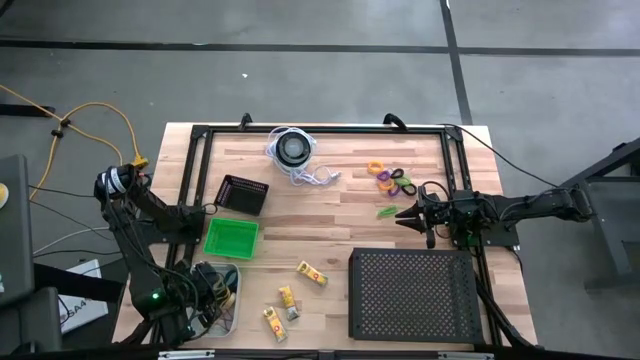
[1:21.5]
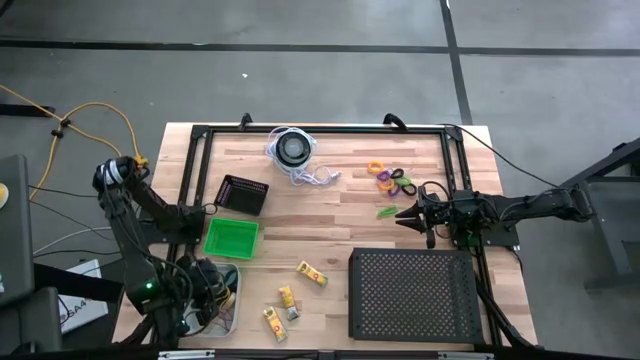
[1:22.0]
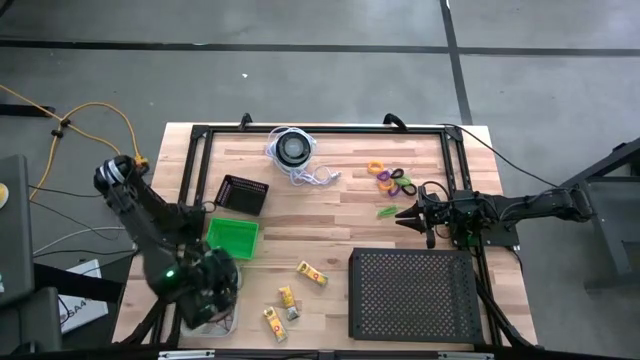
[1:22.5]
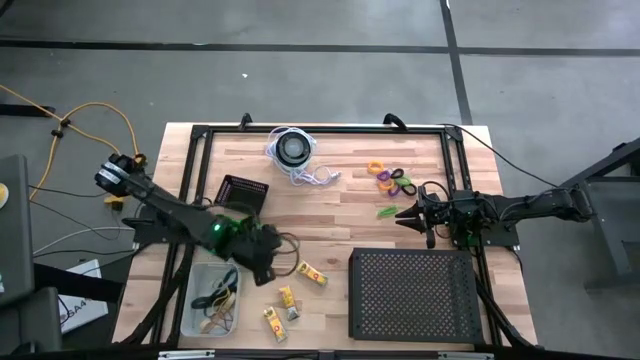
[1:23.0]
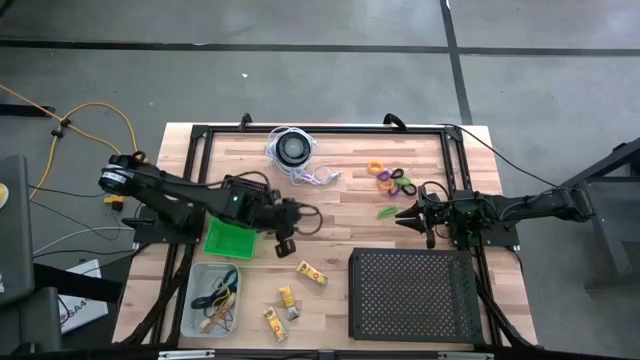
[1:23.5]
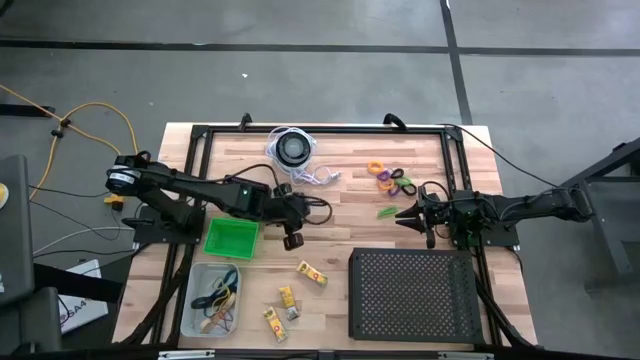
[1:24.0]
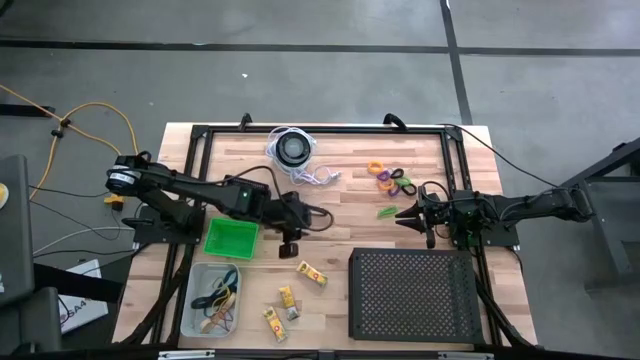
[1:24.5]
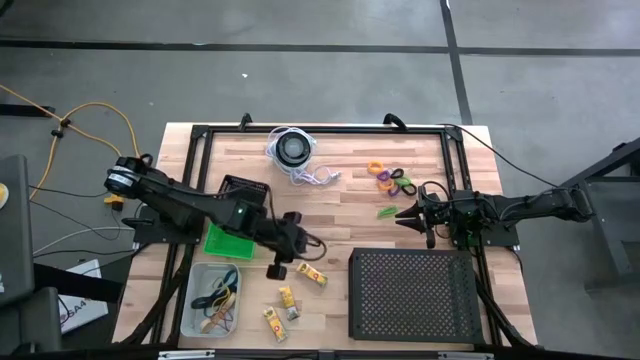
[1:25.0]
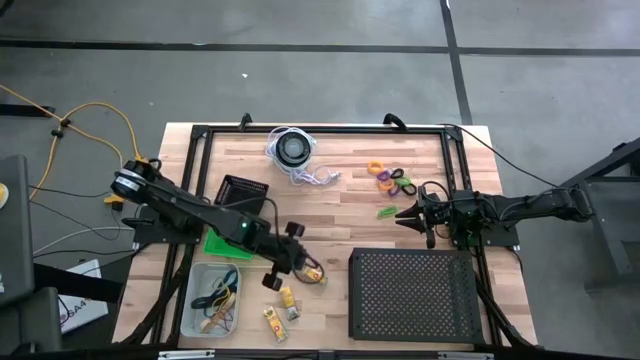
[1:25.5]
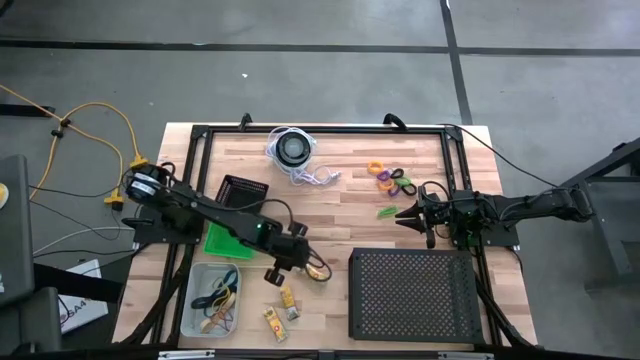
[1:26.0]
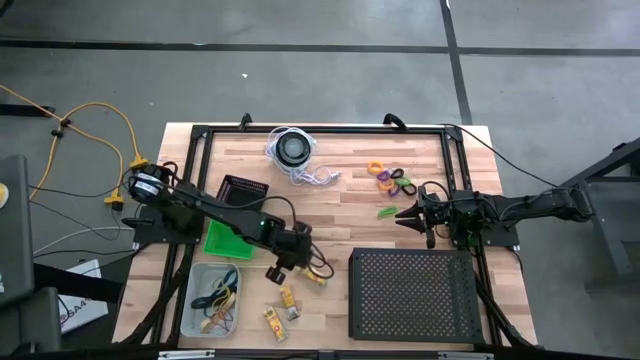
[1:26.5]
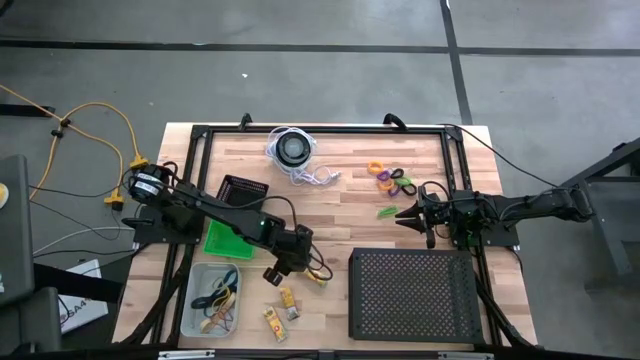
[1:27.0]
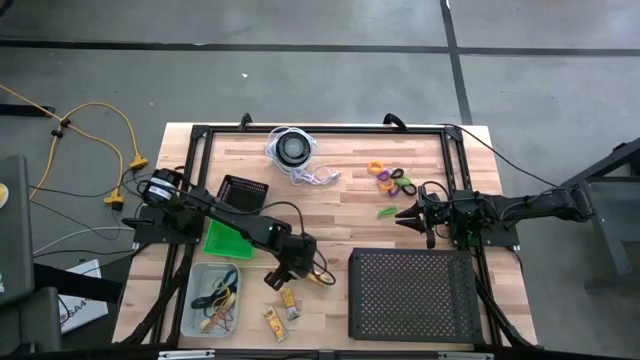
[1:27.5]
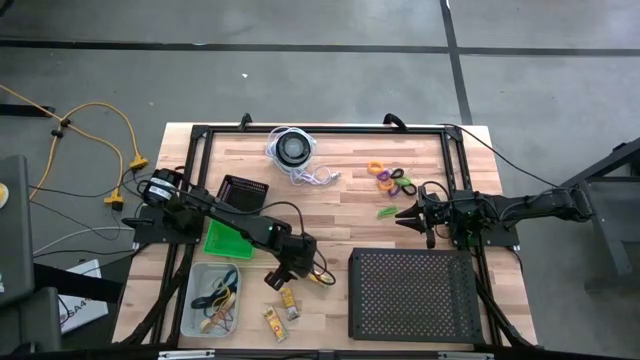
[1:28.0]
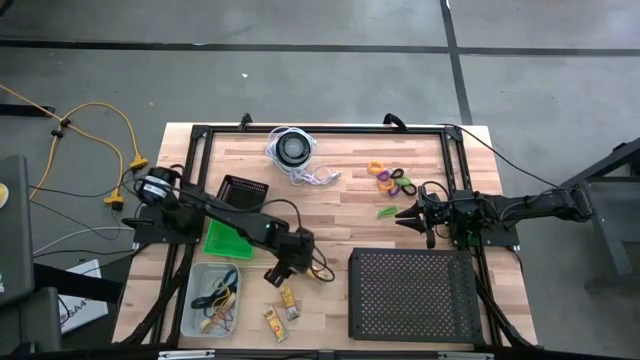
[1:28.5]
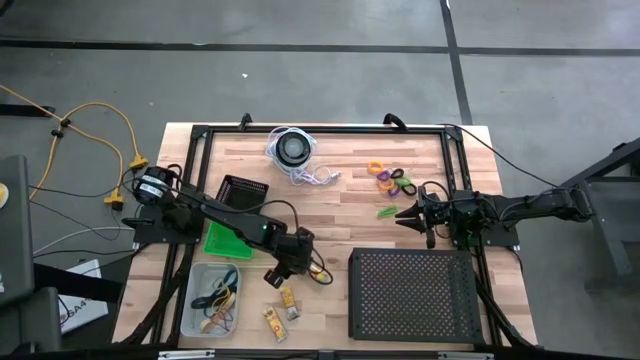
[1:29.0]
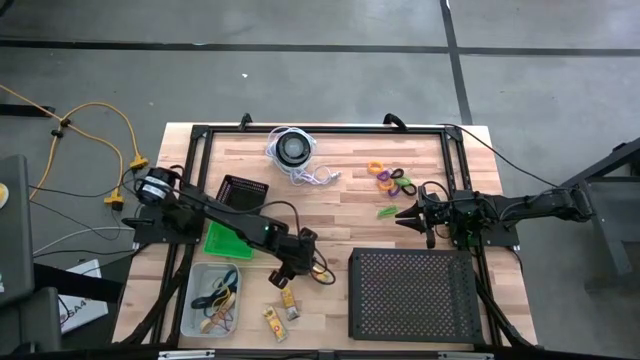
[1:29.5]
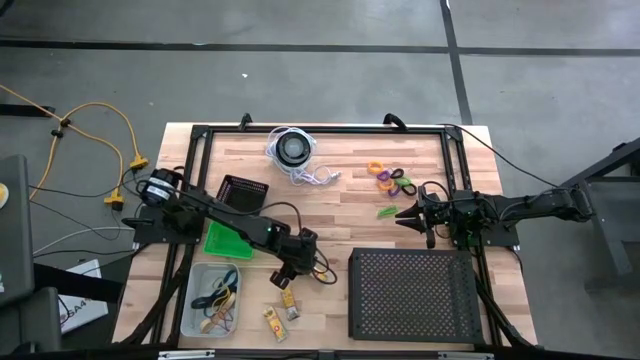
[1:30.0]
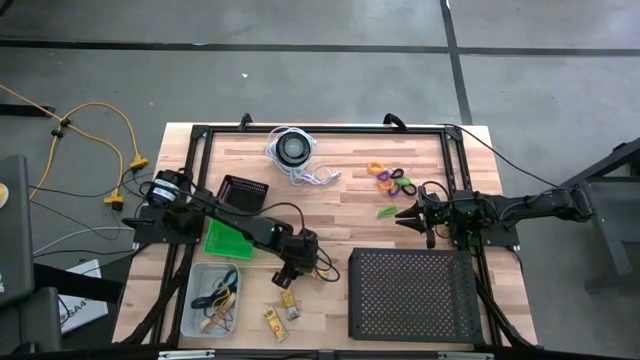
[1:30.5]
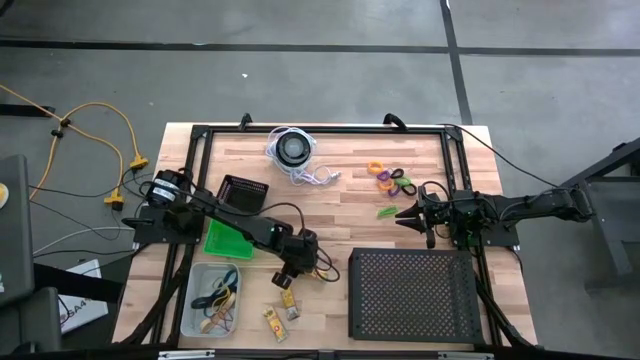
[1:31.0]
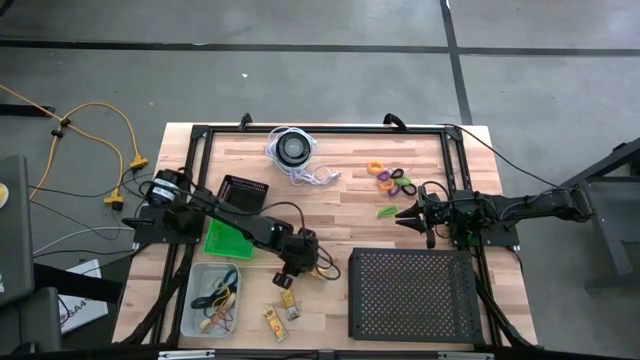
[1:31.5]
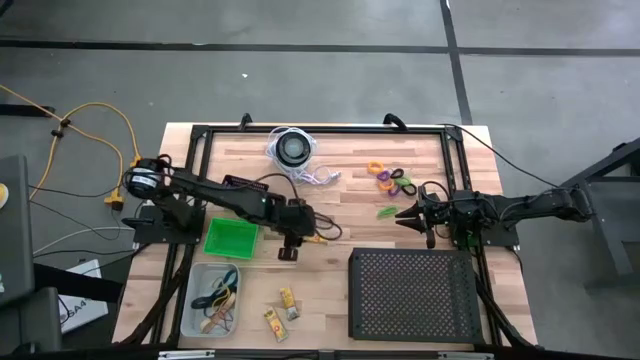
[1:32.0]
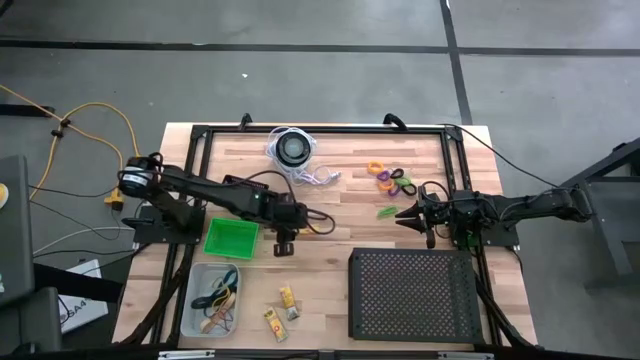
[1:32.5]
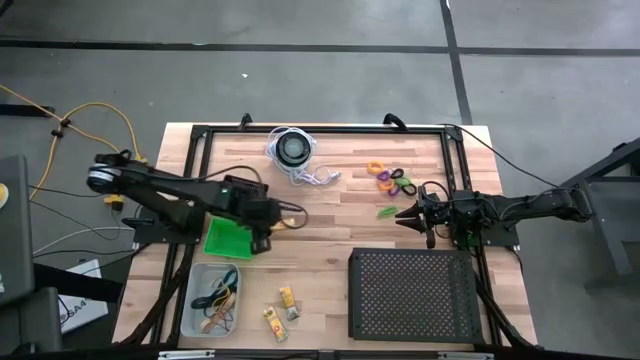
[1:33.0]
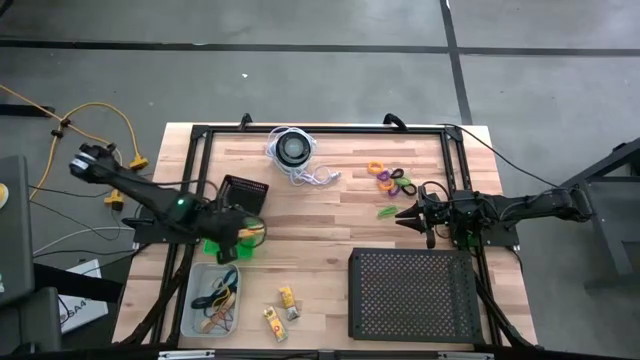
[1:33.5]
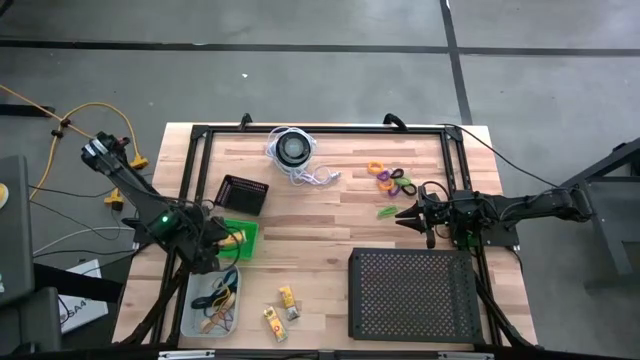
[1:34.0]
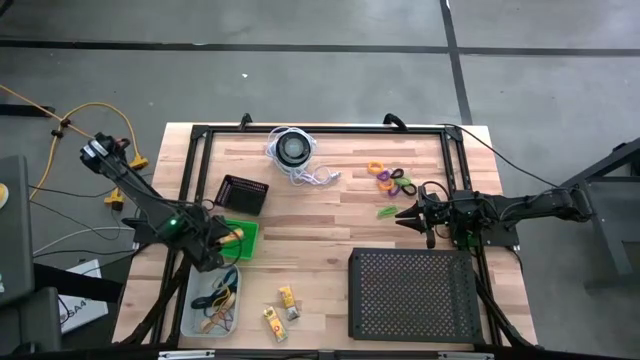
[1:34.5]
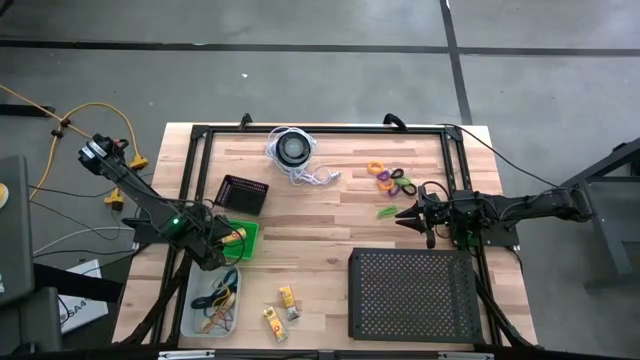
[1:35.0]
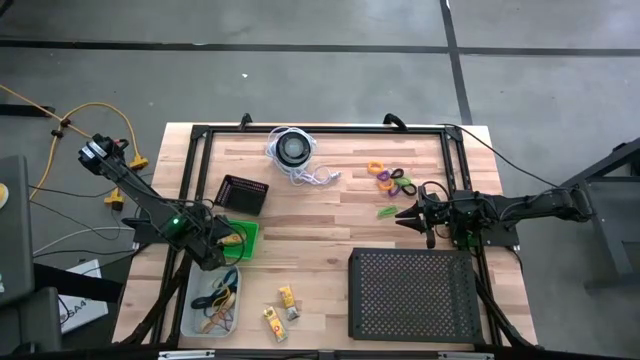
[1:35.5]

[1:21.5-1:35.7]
Task: Pick & Place Office Desk Supplies
Put the top crayon pack into the green bin

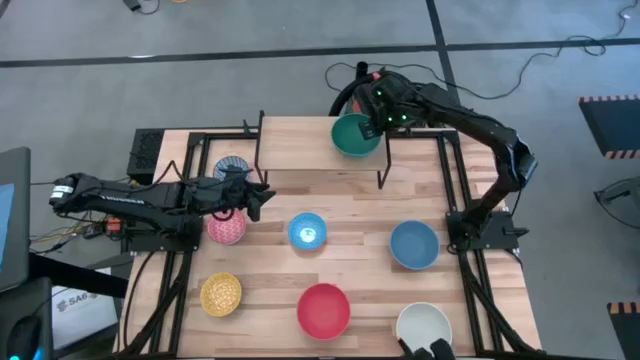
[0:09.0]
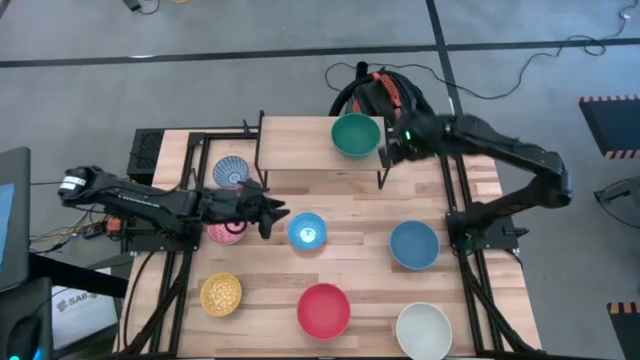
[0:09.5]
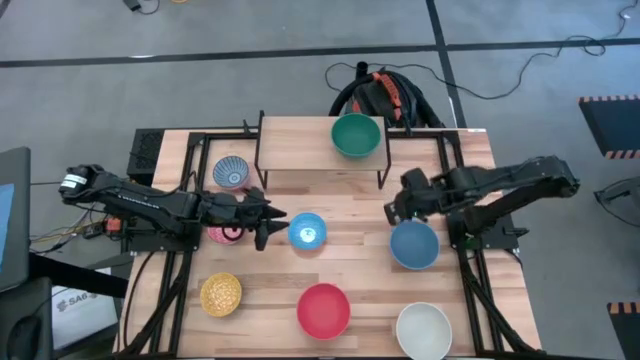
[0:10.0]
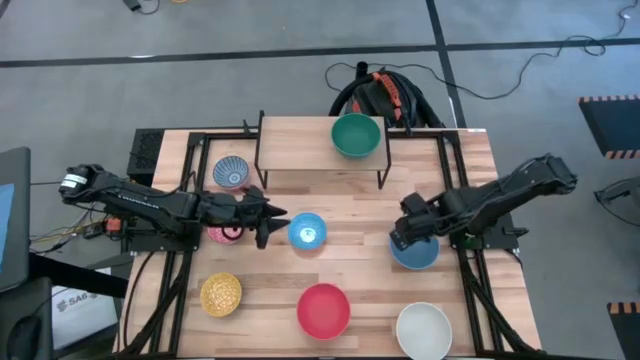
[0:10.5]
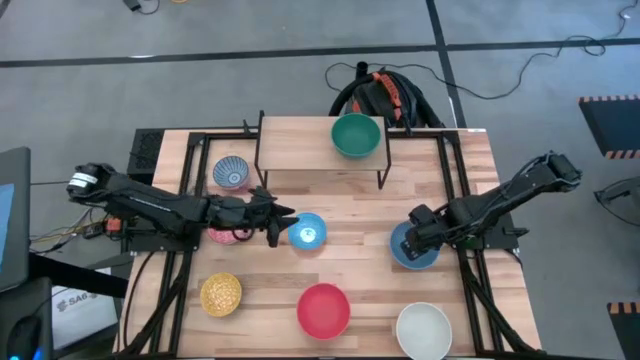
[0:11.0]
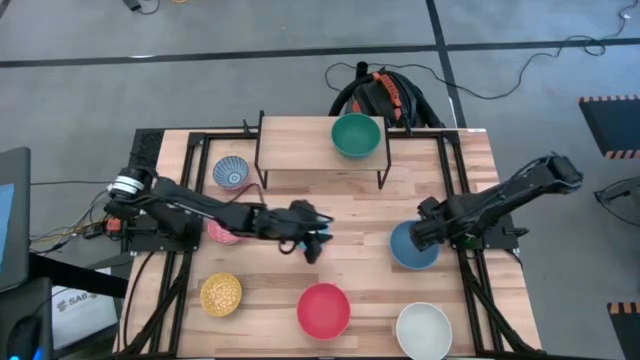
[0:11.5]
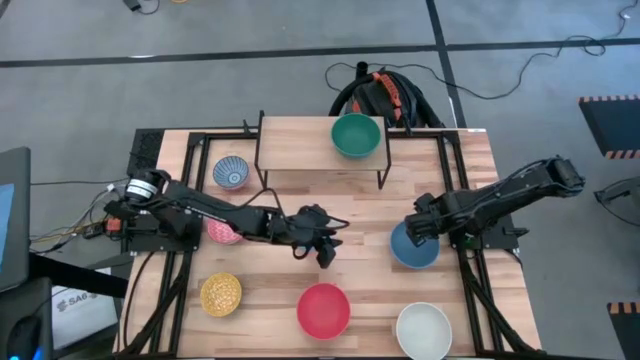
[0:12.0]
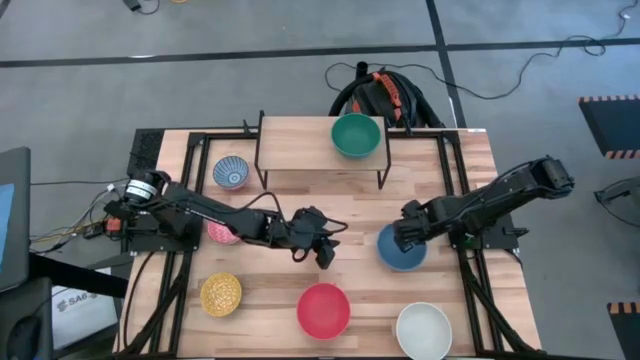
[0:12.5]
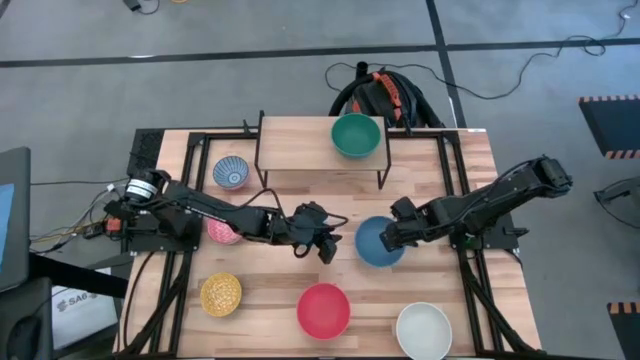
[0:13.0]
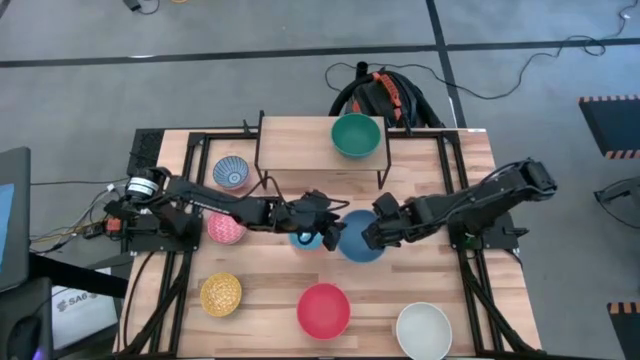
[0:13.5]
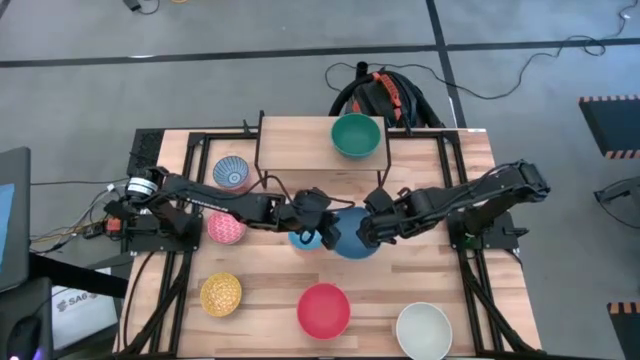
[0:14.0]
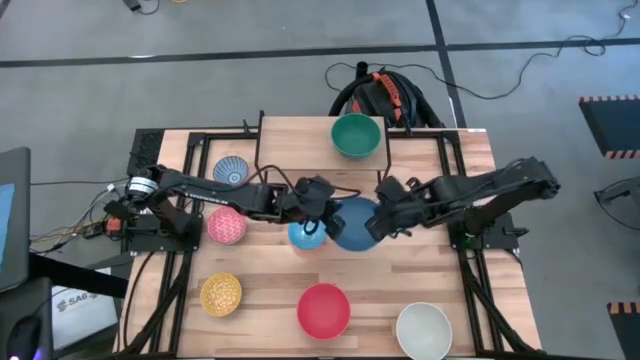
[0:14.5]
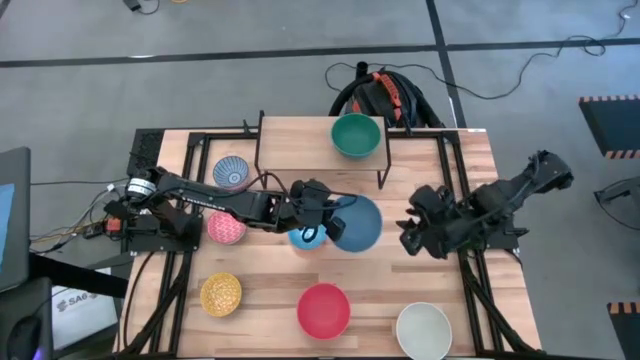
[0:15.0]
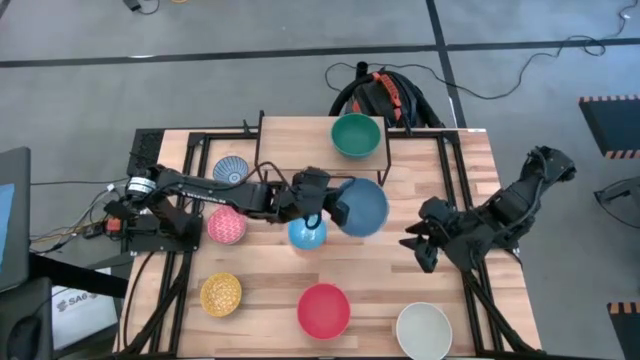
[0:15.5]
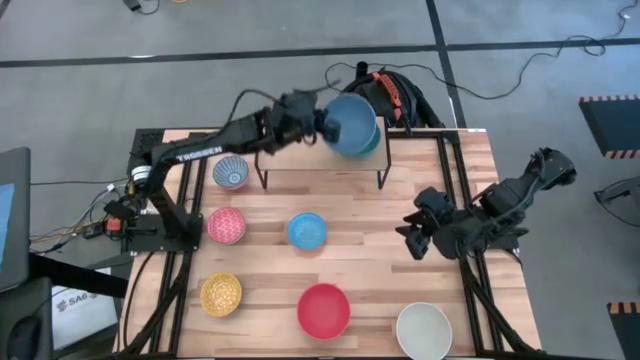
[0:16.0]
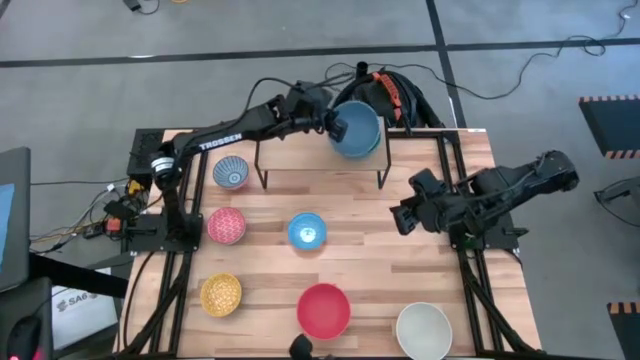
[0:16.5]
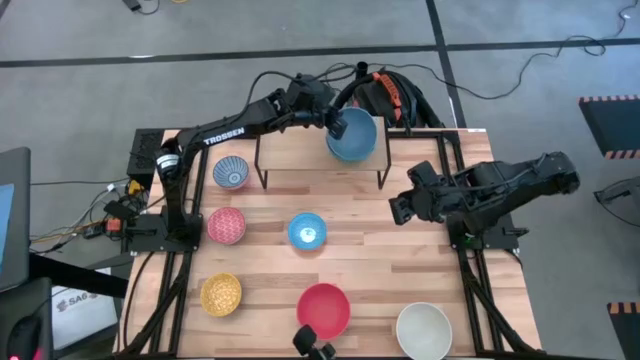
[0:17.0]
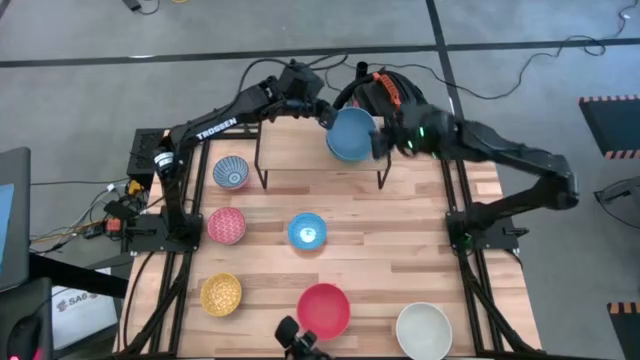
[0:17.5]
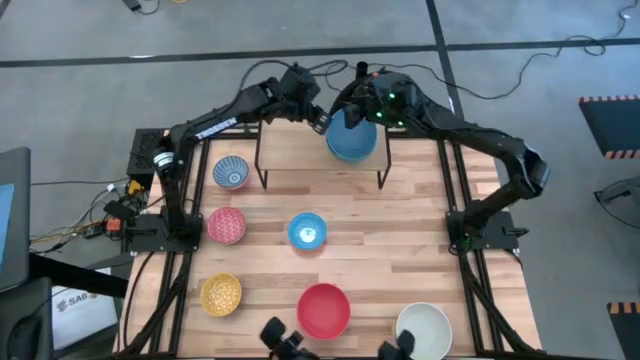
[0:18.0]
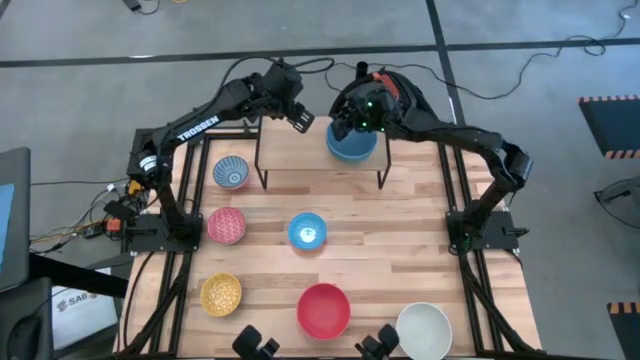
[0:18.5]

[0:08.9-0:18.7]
Task: Place and stack bowls onto a shelf
Stack the blue bowl on top of the green bowl on the shelf
